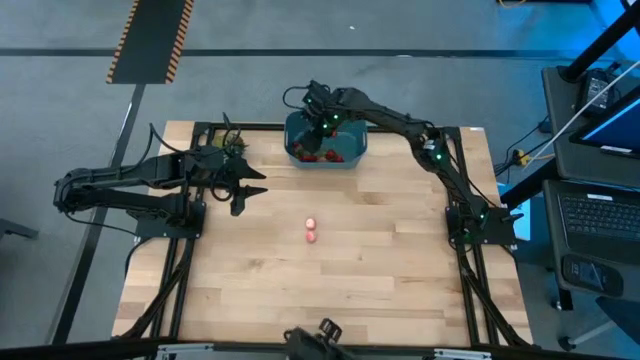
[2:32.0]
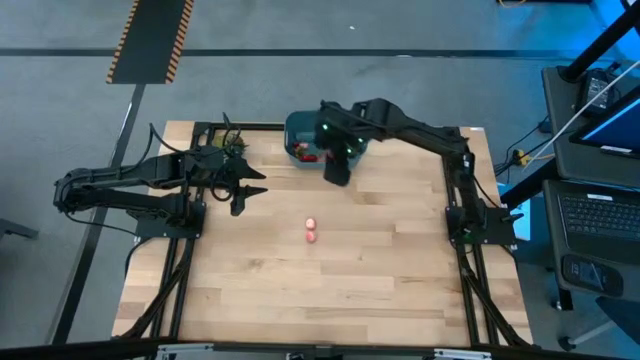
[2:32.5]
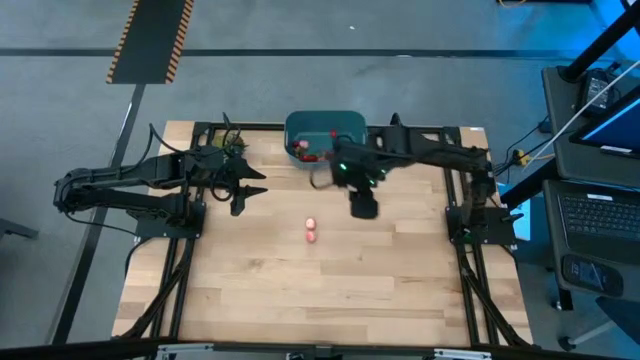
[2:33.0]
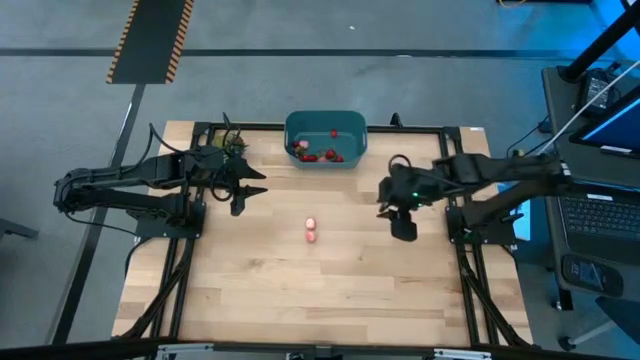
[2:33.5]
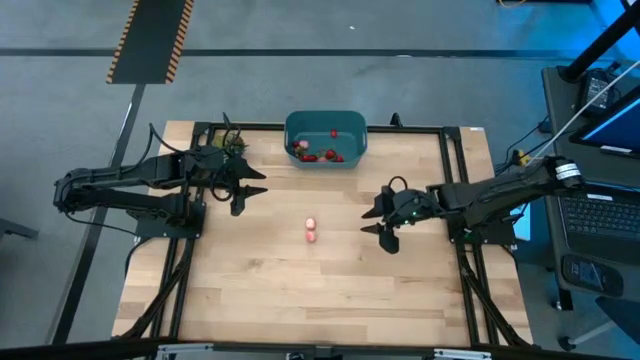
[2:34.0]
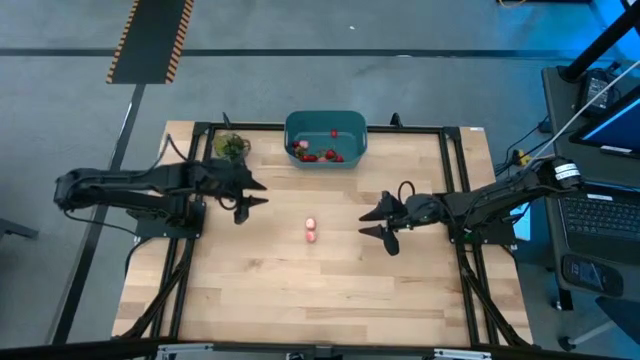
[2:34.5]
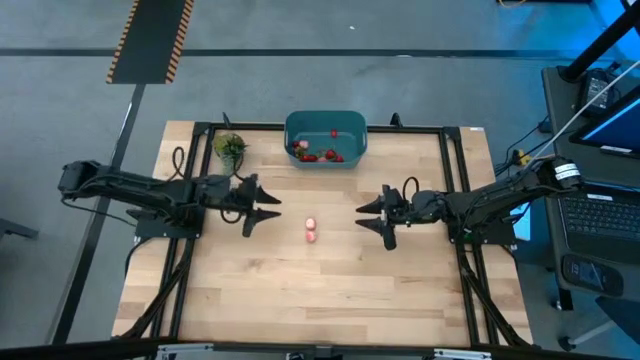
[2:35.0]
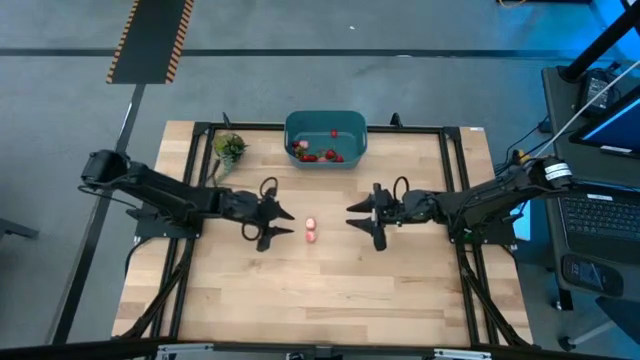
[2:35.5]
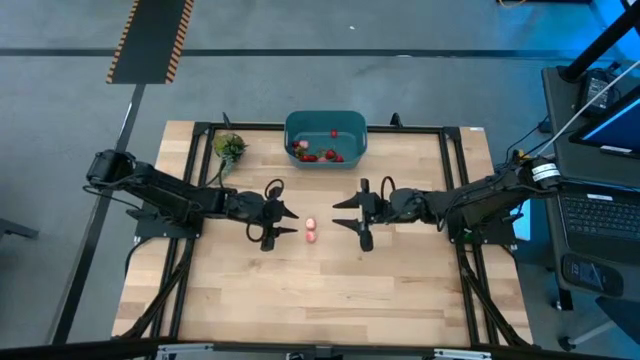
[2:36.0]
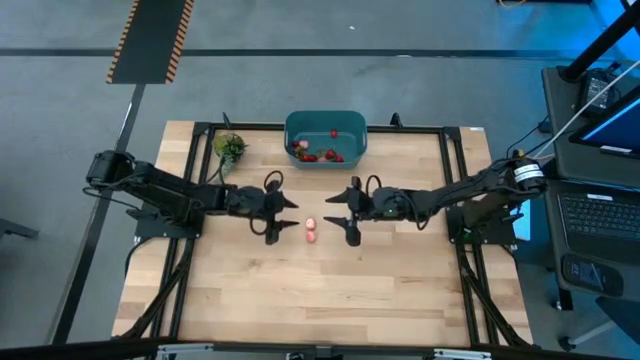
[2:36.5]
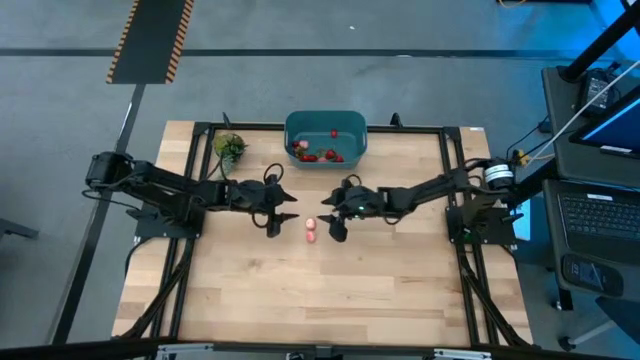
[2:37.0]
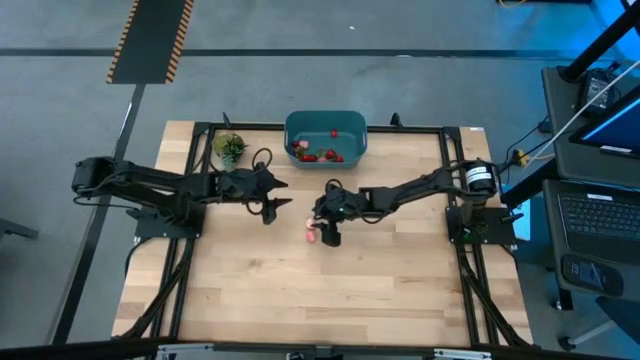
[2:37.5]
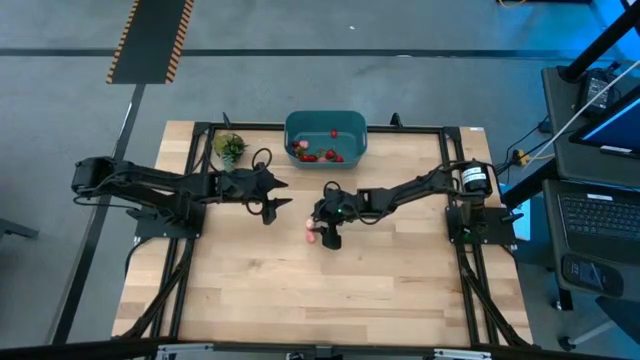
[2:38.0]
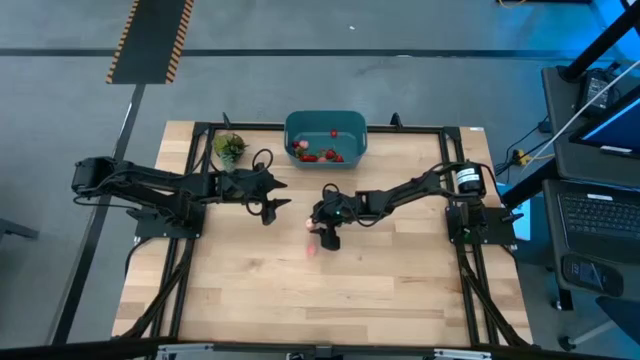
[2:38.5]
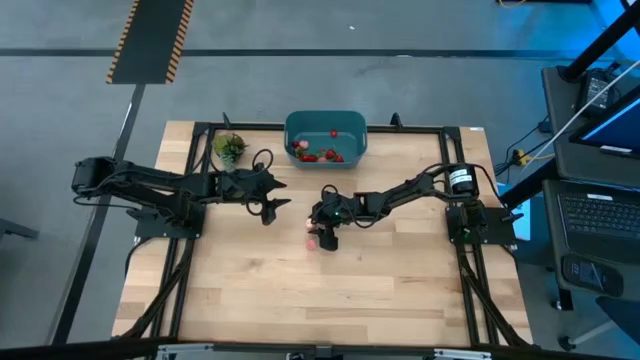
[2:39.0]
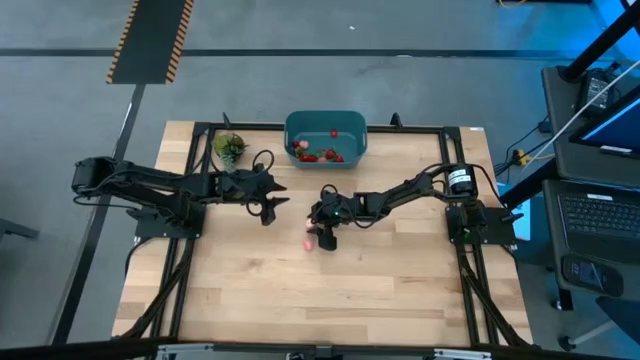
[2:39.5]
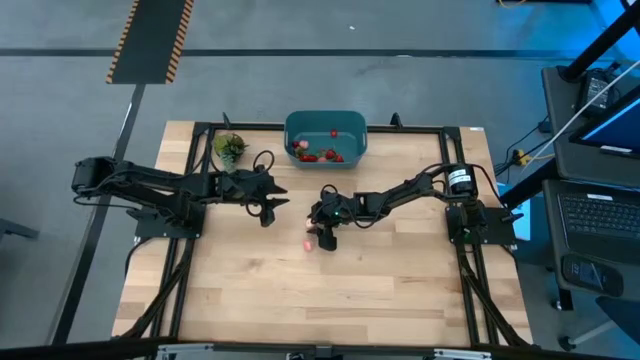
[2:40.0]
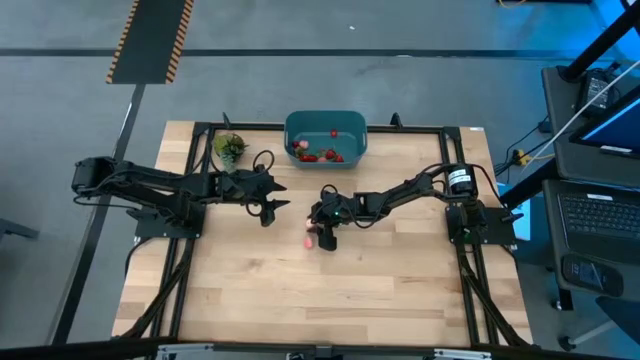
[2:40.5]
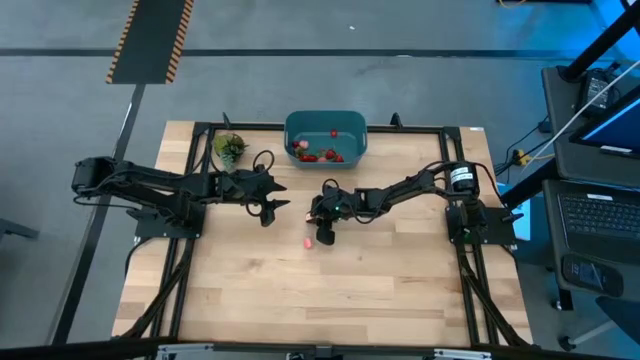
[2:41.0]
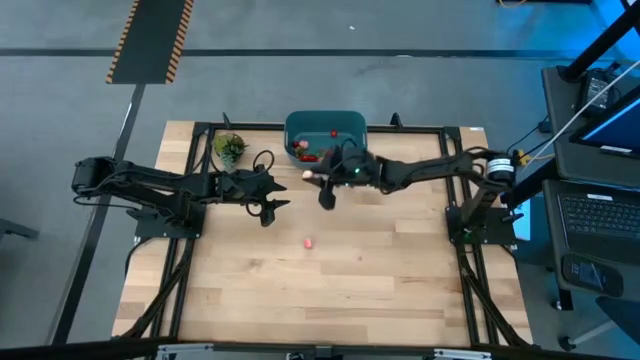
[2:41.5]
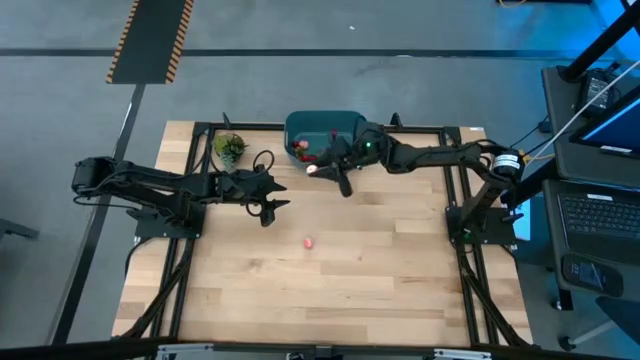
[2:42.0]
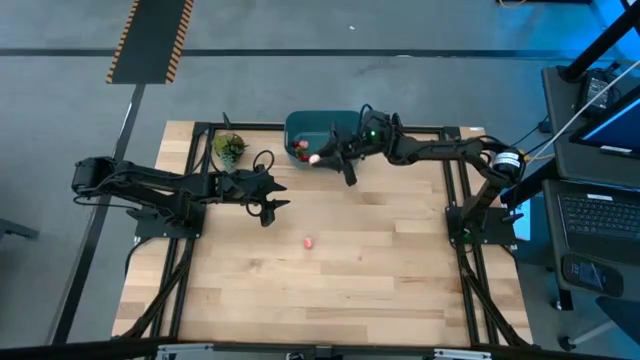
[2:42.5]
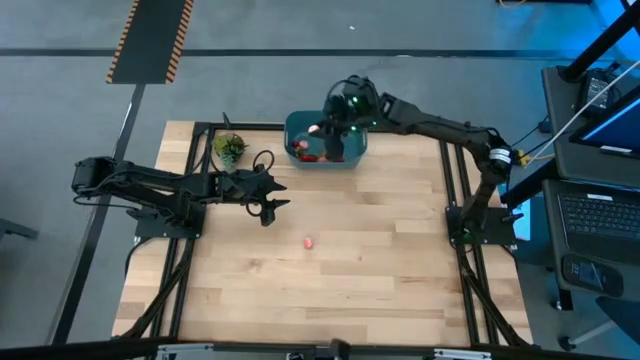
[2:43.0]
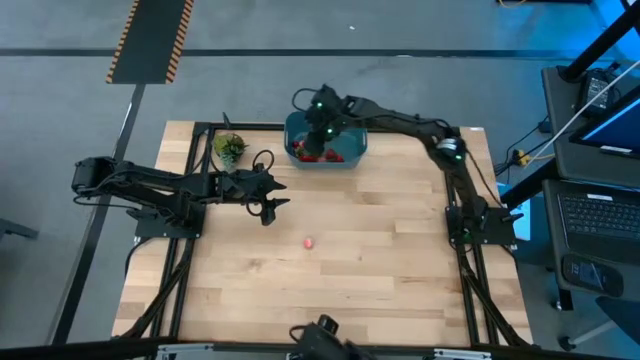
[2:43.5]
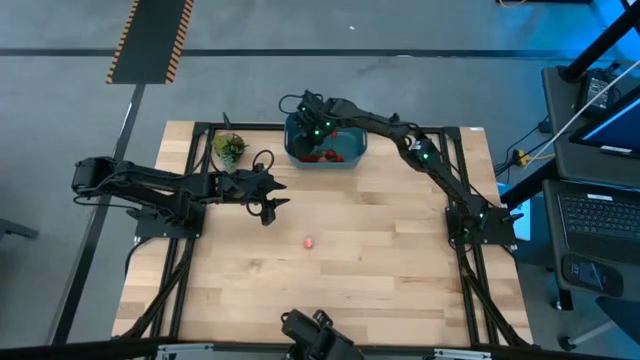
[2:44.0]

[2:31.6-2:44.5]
Task: Pick and placing Produce into tupperware
Put the pink peach into the blue bin

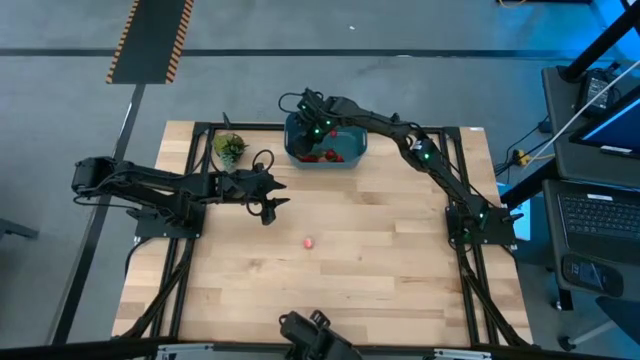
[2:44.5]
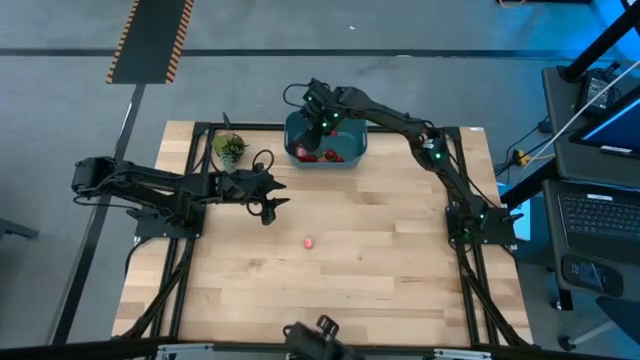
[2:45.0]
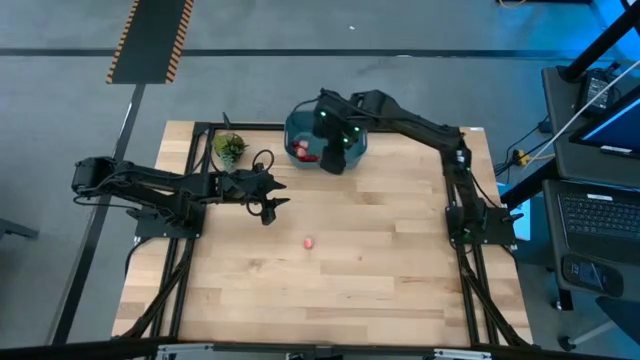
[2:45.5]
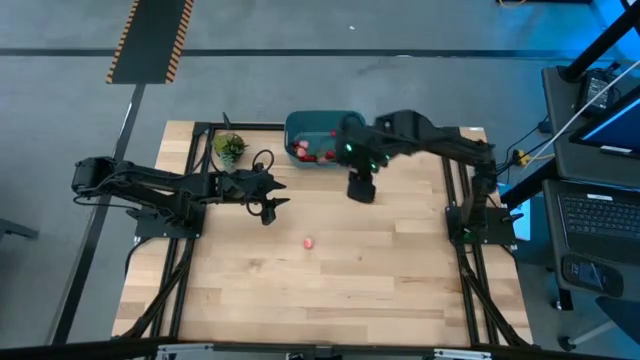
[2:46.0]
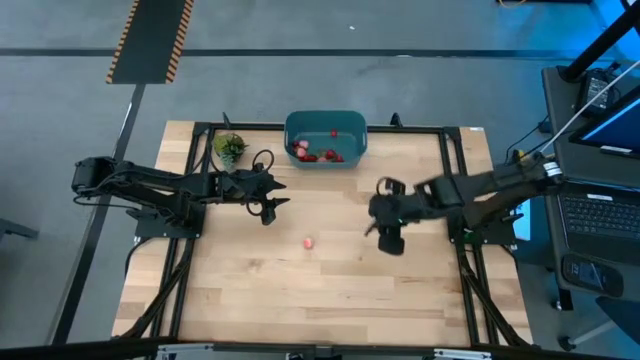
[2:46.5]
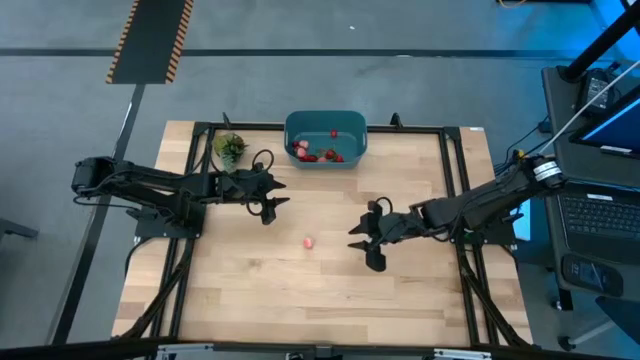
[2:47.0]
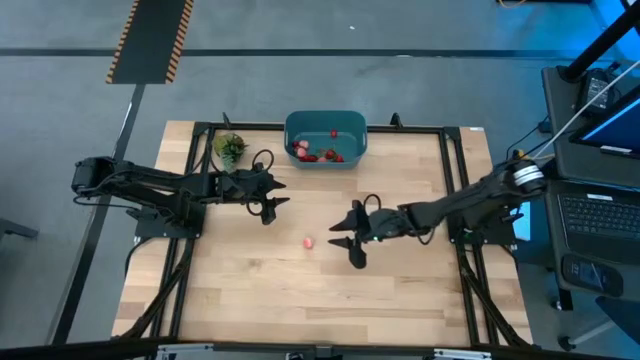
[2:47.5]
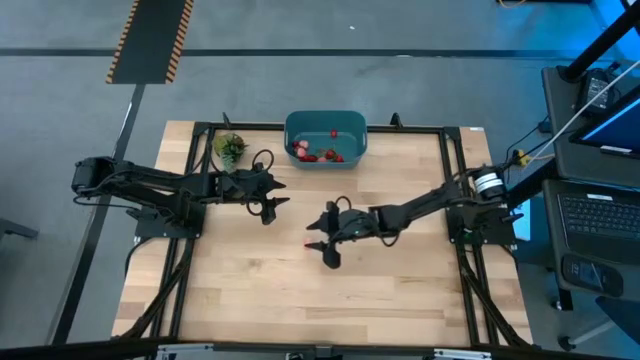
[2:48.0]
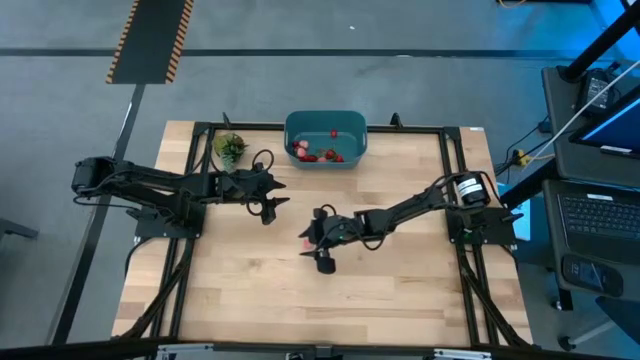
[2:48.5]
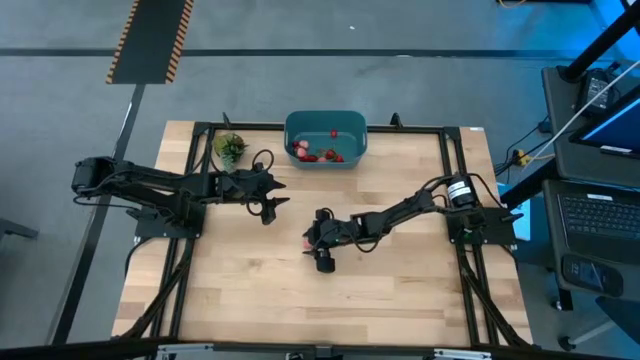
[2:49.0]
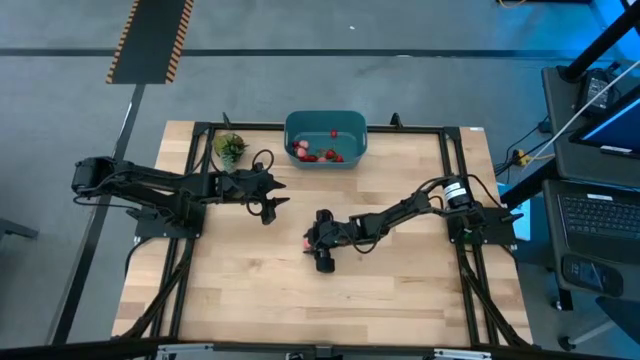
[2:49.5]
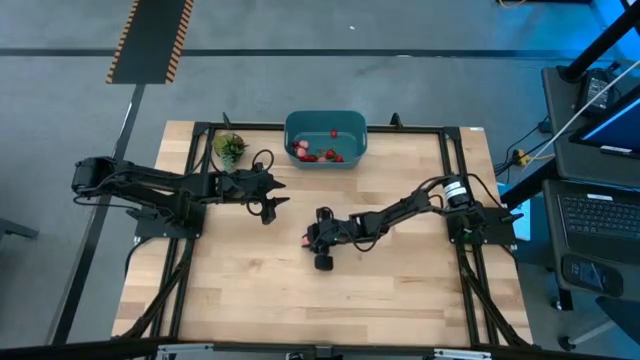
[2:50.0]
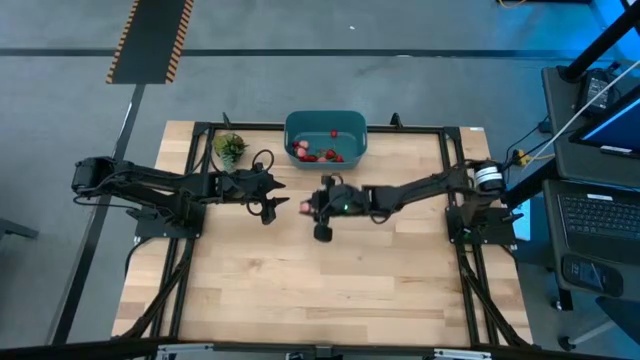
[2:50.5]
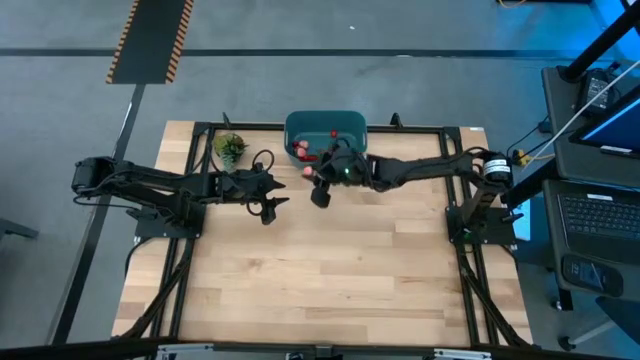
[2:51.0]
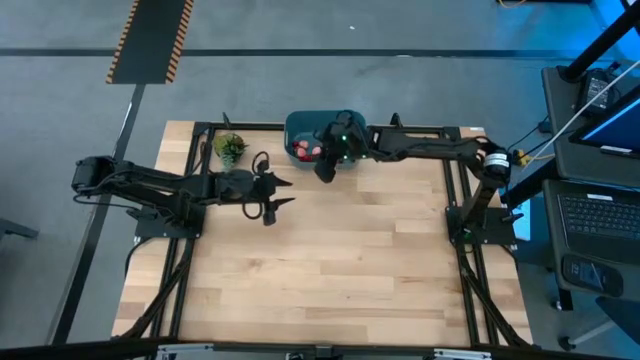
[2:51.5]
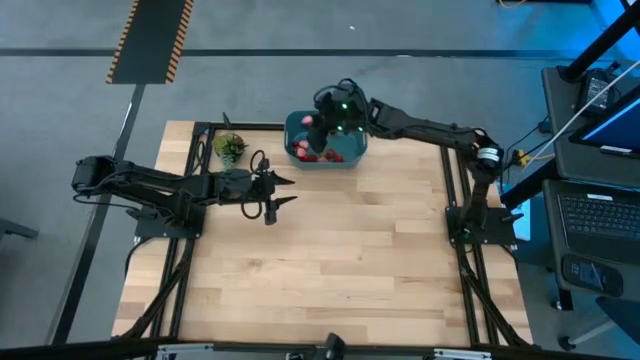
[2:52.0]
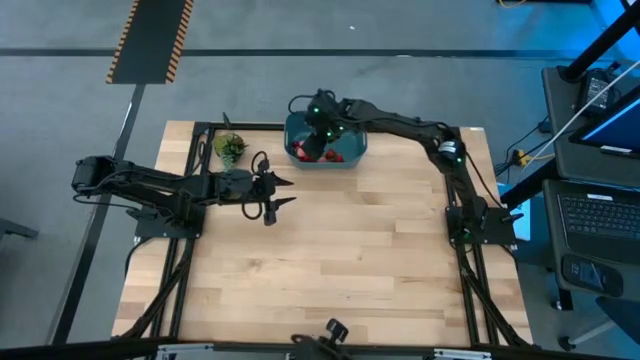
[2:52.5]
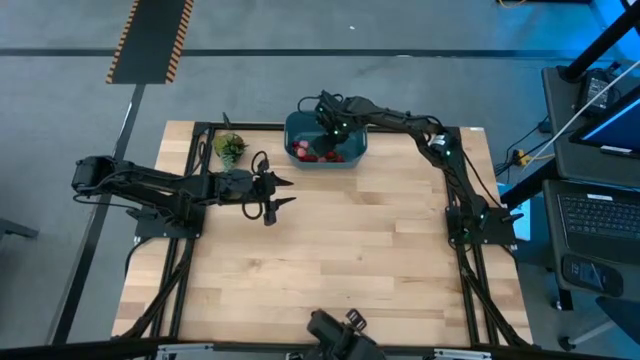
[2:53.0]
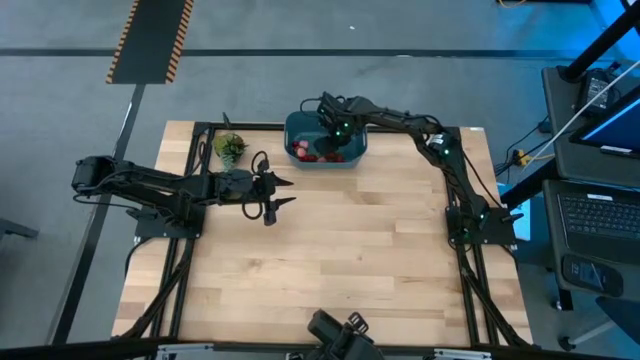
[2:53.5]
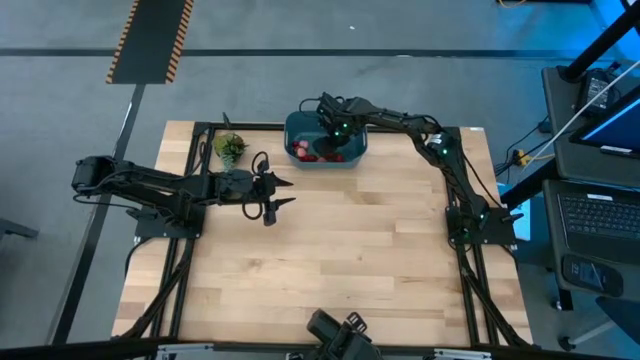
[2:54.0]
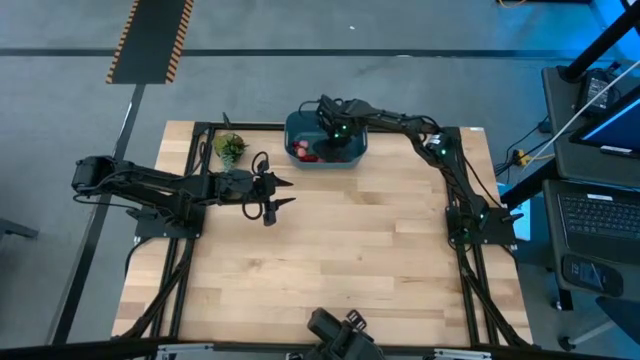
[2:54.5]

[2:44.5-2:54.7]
Put the pink peach into the blue bin
